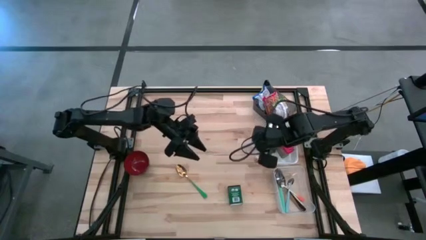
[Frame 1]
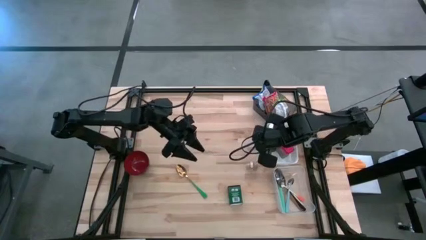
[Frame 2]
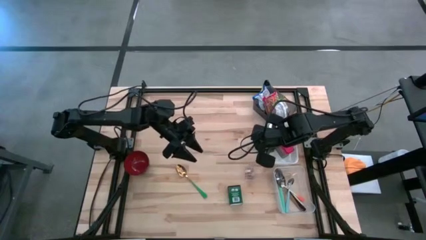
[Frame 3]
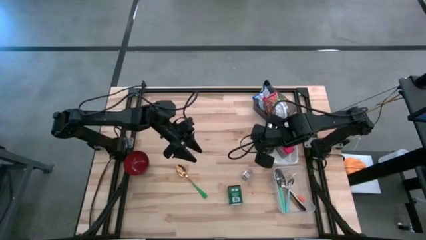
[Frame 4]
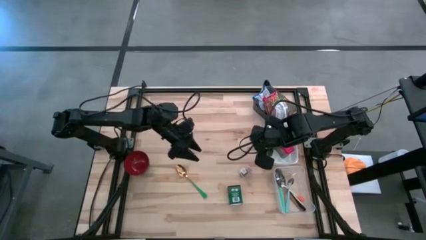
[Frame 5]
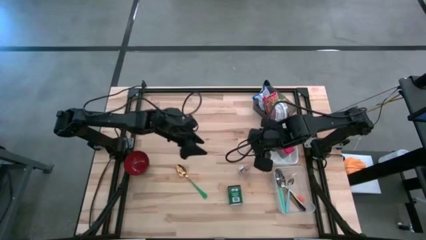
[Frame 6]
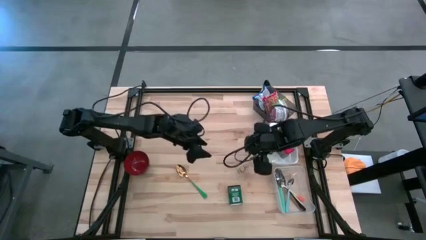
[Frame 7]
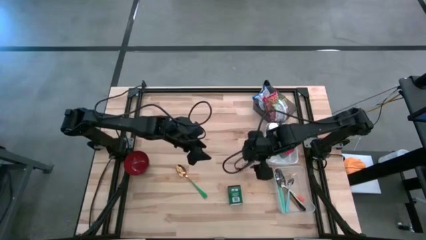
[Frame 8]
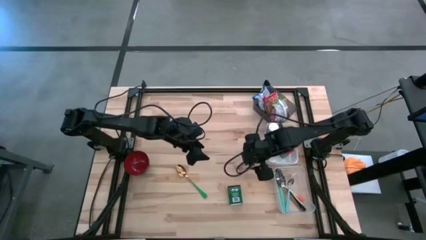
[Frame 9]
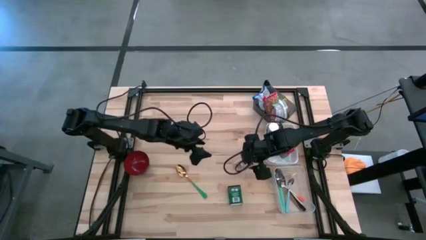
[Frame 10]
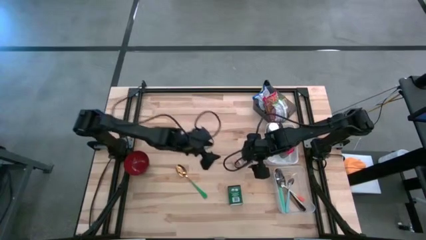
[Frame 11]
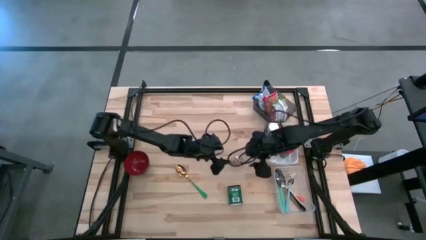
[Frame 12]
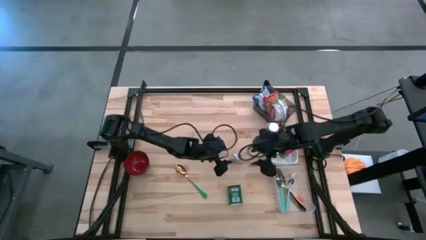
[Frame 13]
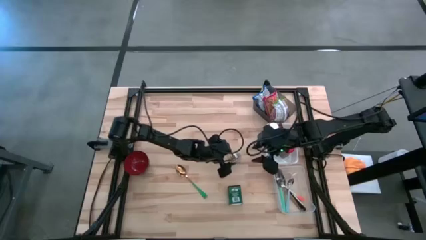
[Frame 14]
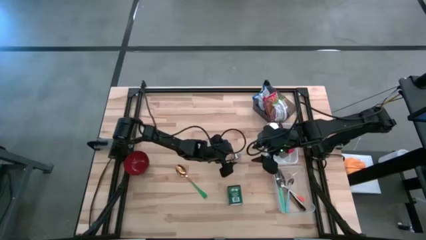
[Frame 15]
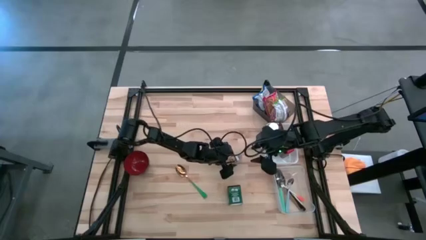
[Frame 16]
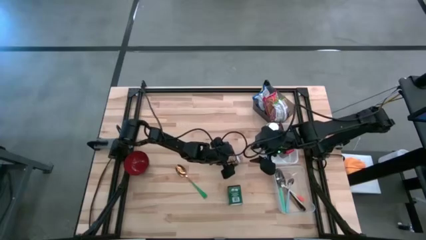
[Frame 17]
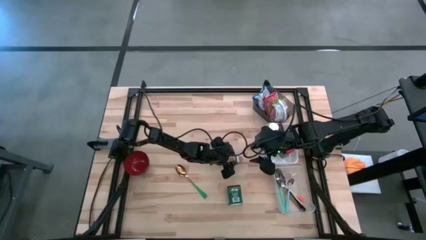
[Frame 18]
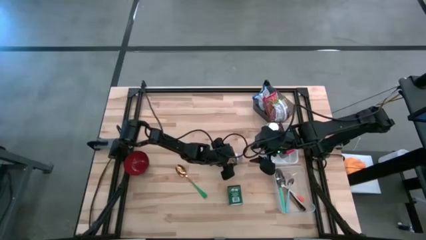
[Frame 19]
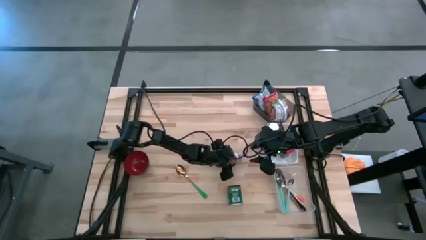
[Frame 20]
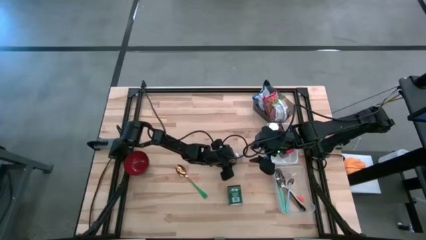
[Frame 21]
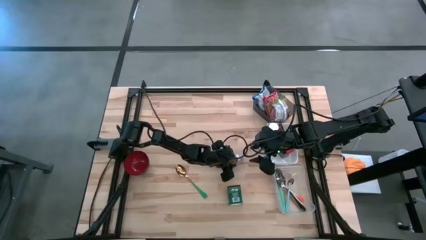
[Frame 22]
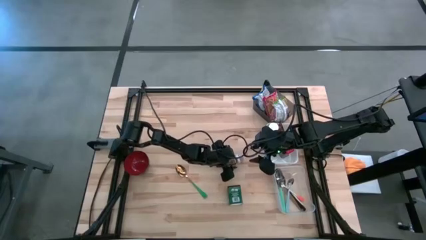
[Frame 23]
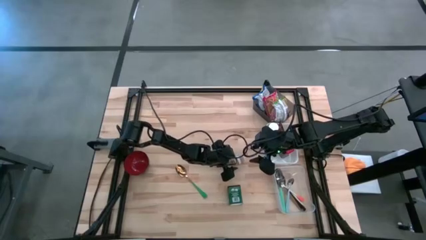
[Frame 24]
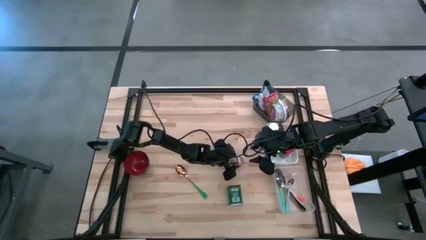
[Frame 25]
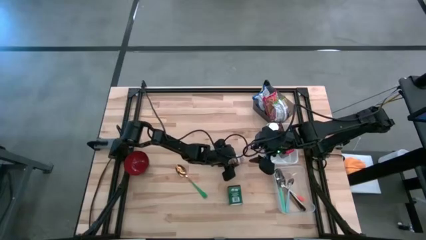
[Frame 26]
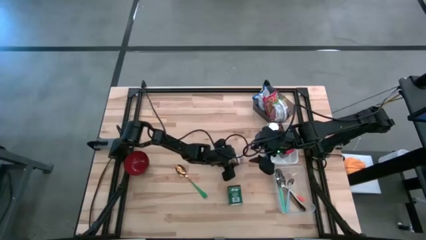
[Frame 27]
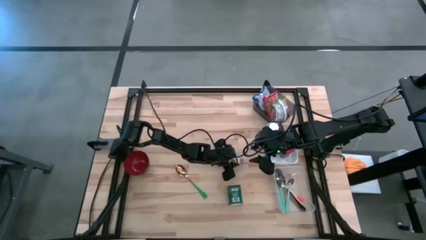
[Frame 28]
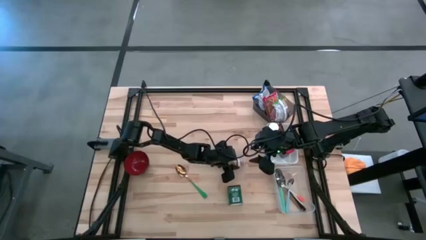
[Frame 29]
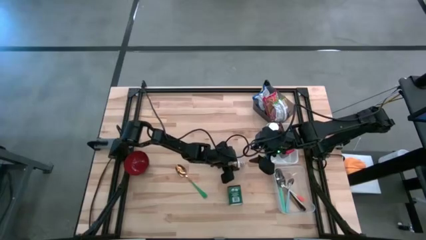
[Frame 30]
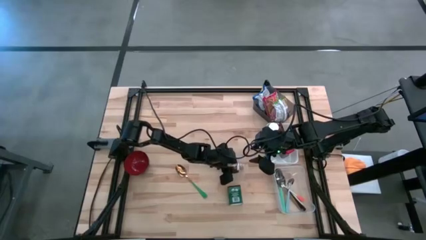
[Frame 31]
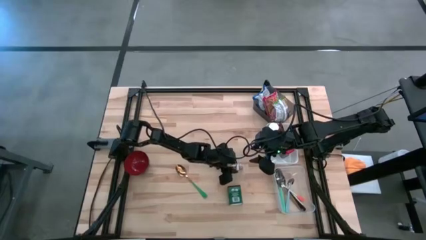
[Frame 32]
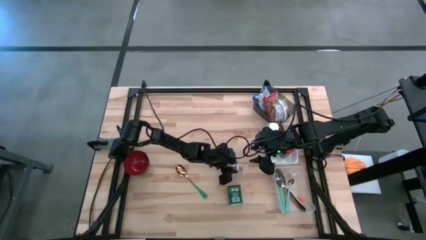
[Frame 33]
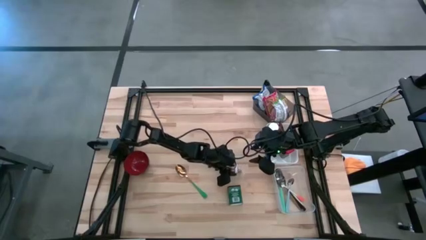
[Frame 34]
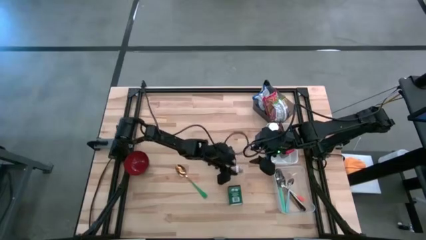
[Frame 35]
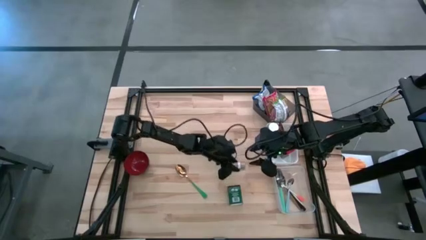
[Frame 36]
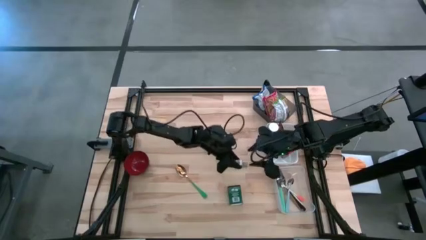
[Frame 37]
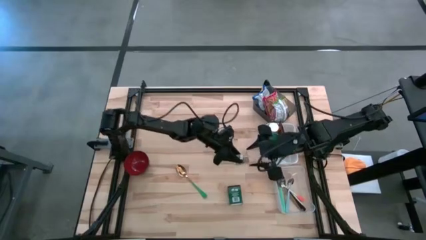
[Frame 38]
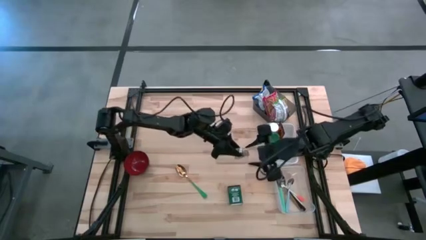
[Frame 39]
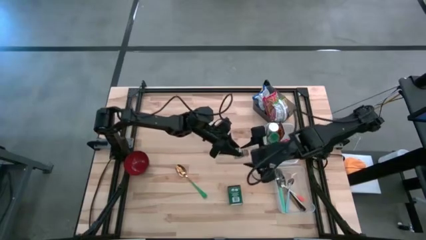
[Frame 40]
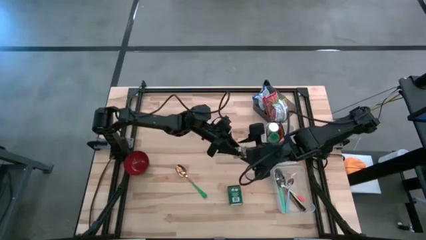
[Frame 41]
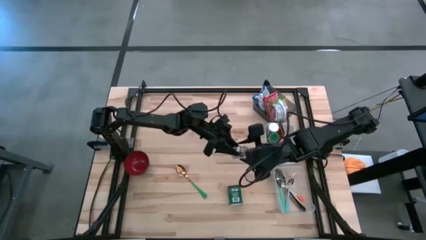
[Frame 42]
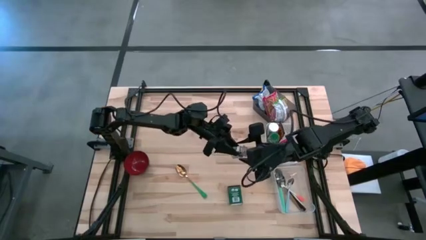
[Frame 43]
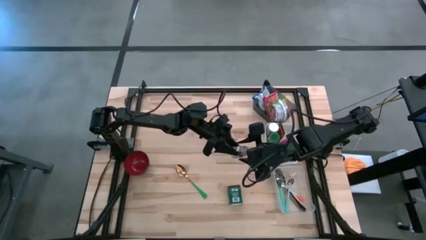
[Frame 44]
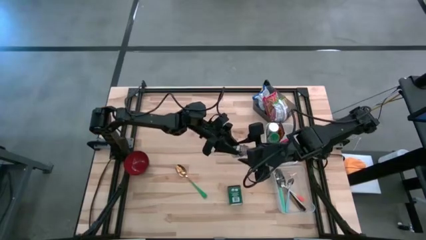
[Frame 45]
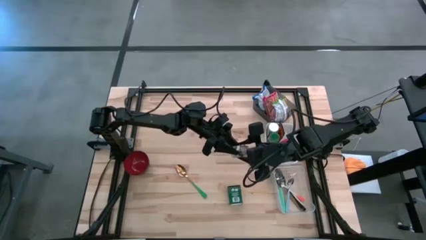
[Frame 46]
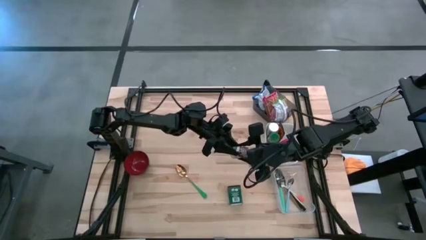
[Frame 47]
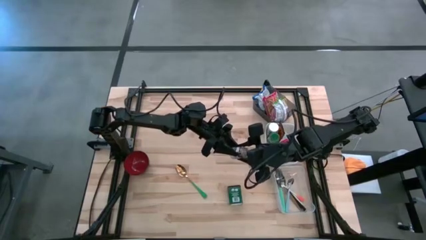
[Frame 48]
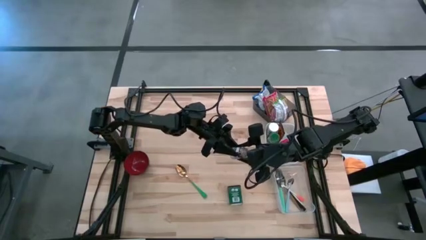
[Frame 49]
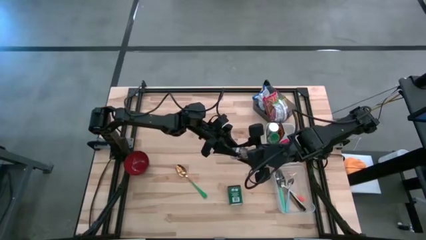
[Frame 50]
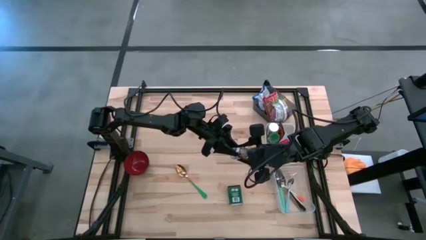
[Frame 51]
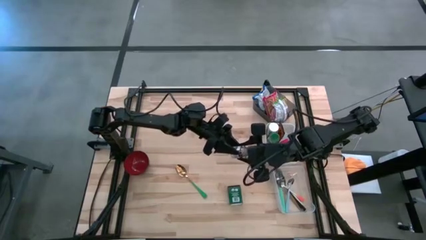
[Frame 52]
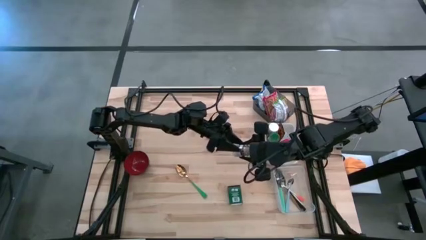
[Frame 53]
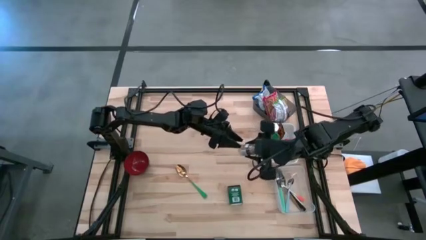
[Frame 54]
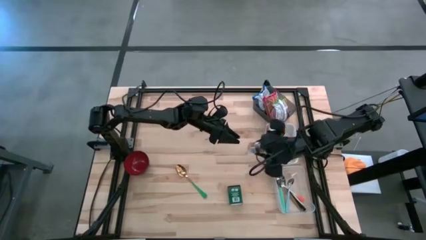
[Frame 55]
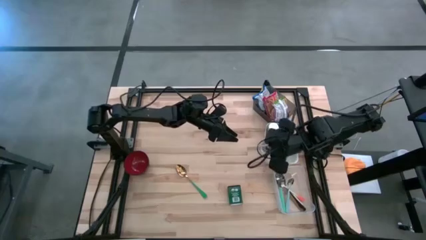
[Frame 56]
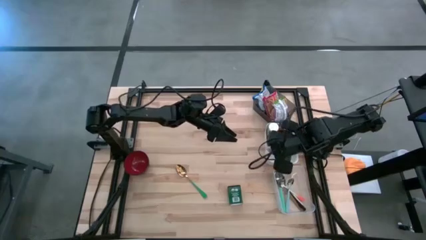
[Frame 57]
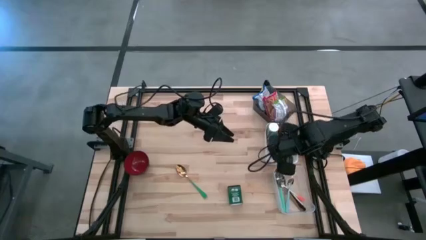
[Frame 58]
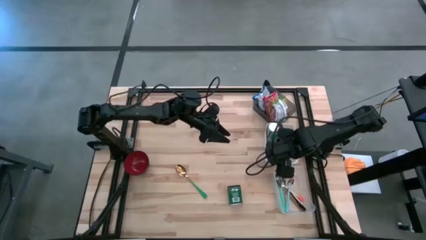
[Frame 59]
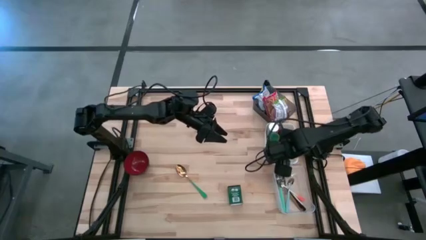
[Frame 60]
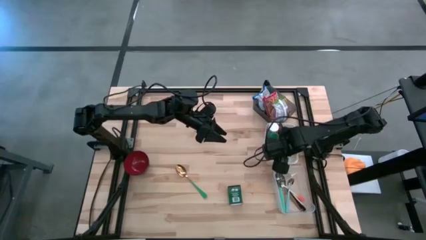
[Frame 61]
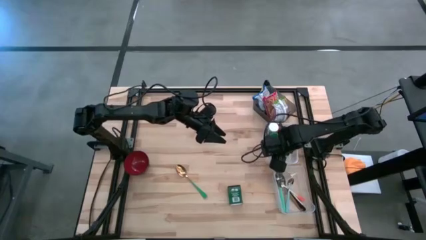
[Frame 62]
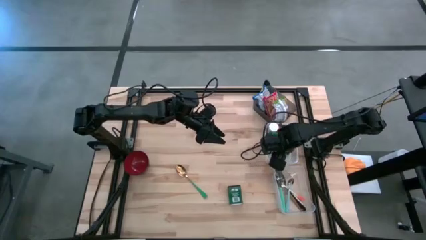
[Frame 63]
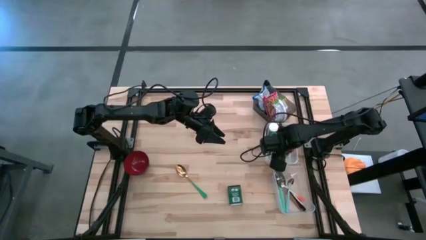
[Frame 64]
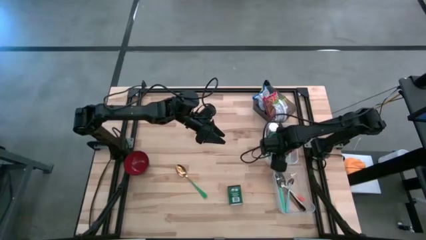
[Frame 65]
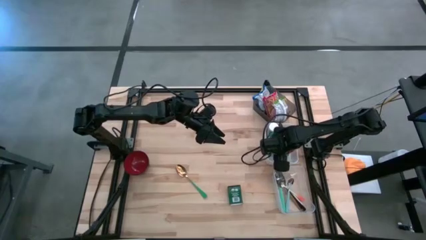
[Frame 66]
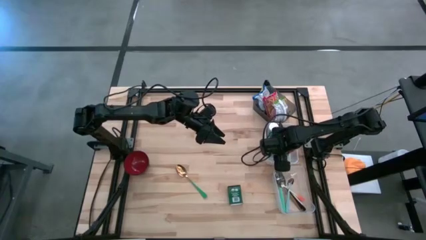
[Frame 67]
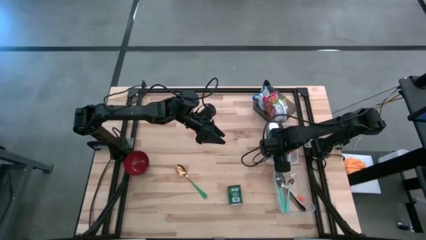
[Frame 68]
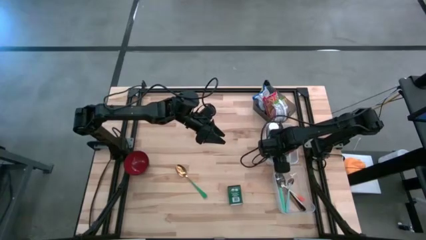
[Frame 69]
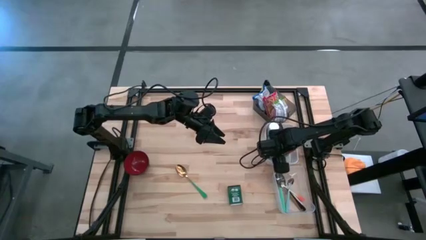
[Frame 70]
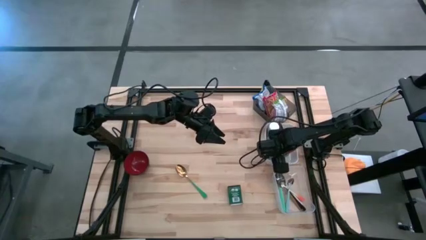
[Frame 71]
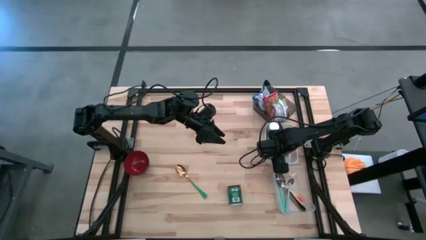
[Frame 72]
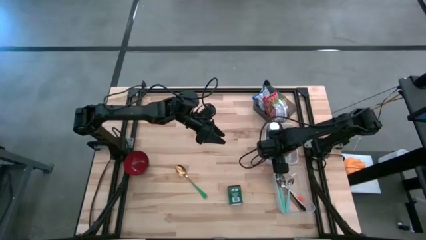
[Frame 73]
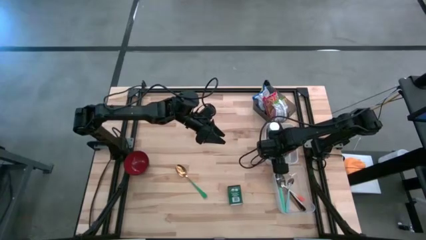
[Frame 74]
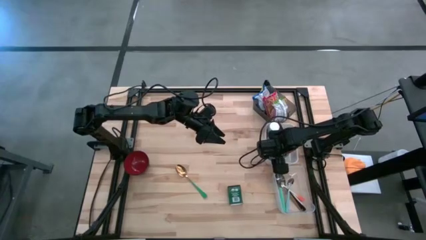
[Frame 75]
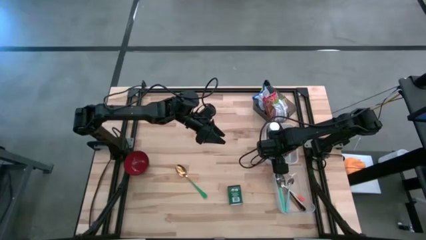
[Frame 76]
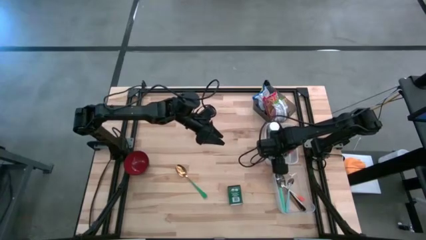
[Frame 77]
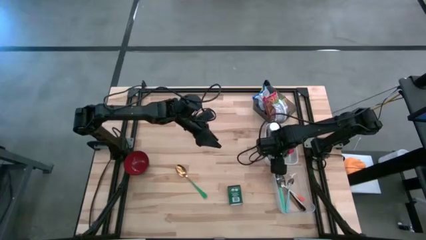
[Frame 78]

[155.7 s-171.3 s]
Put the brown seasoning bottle into the white bin
